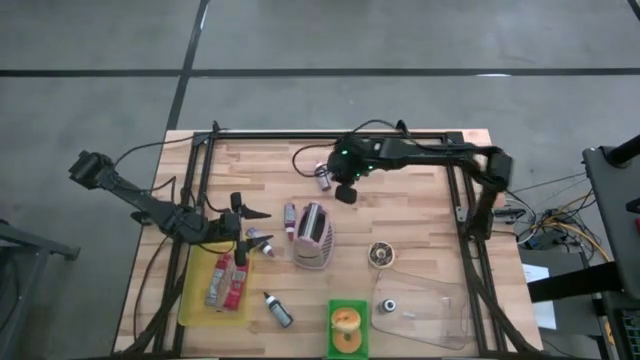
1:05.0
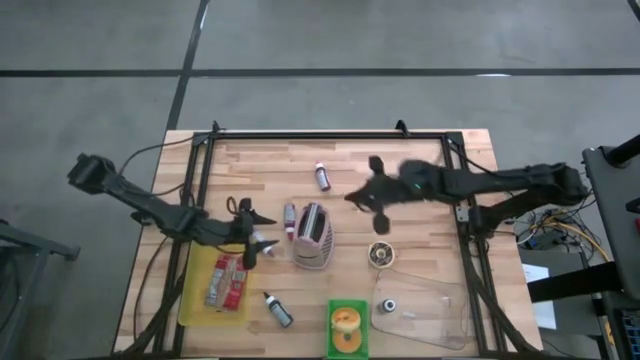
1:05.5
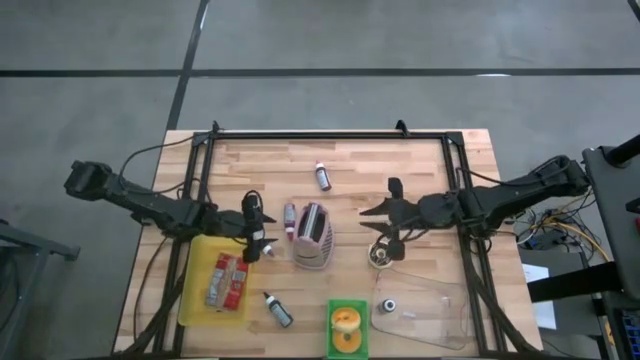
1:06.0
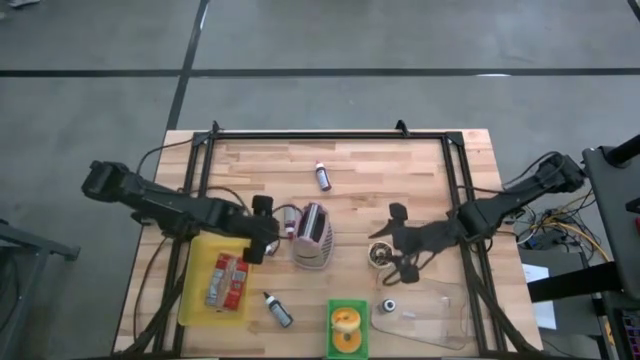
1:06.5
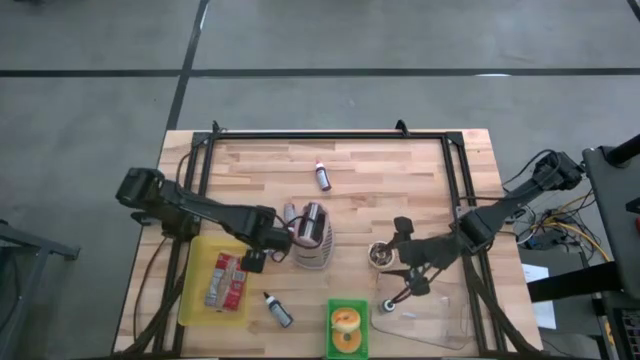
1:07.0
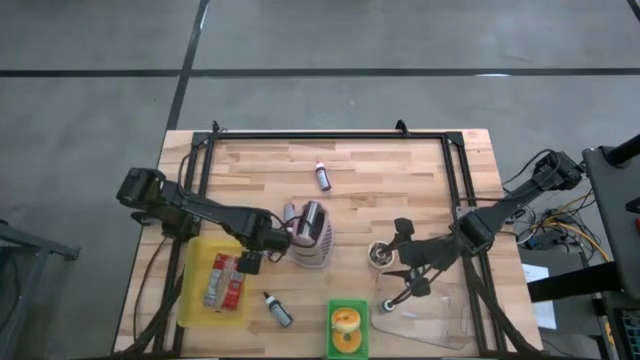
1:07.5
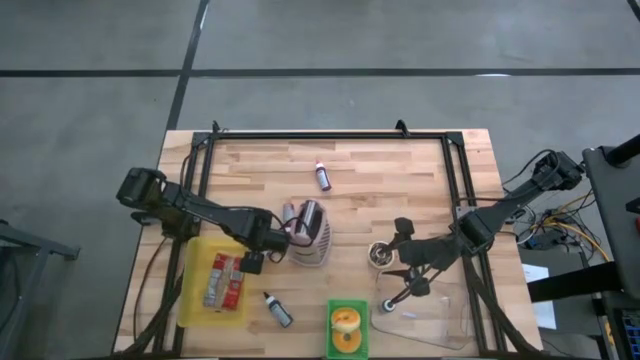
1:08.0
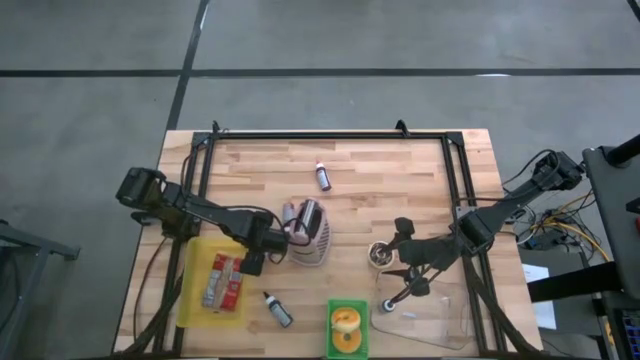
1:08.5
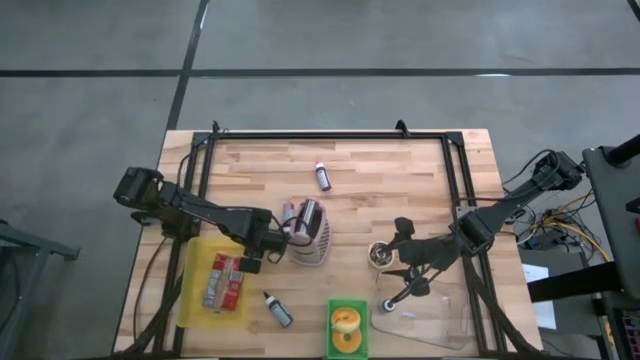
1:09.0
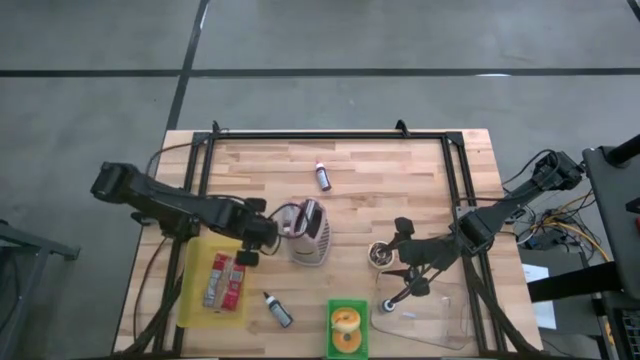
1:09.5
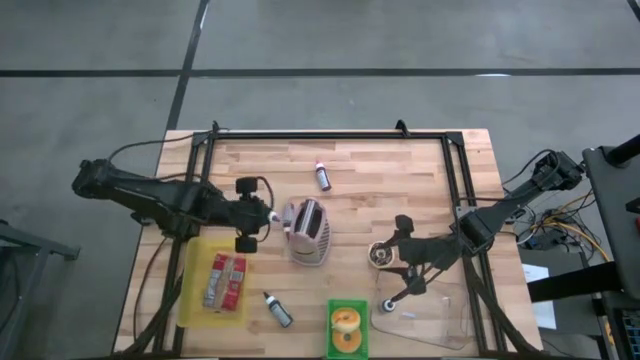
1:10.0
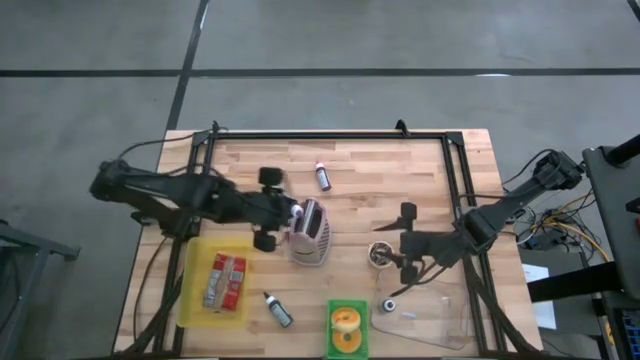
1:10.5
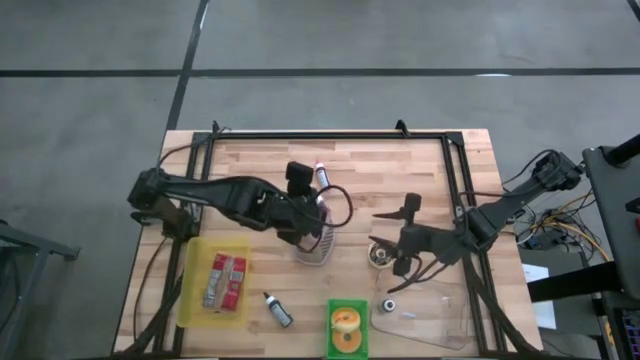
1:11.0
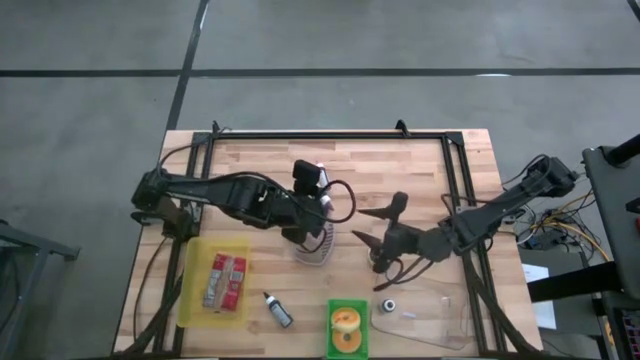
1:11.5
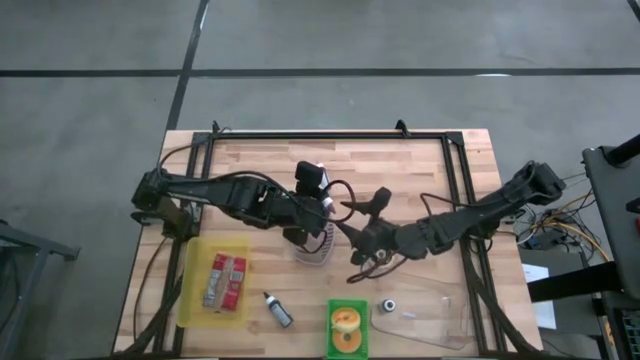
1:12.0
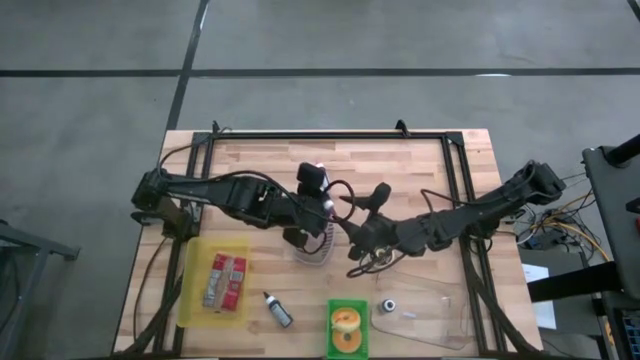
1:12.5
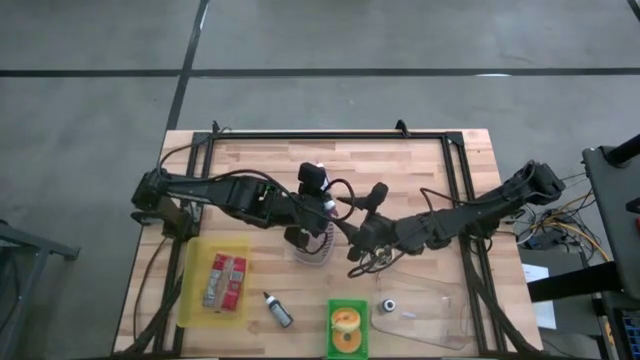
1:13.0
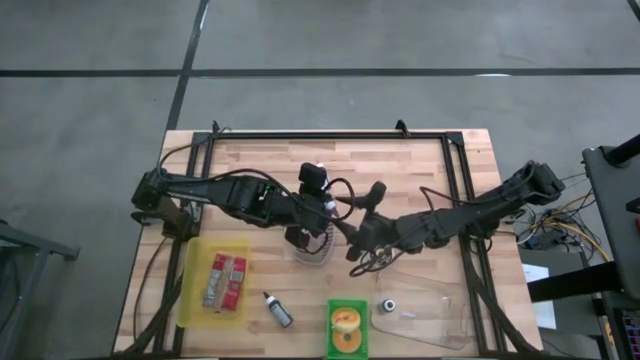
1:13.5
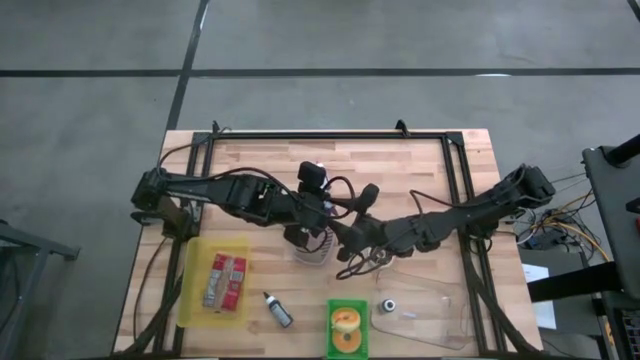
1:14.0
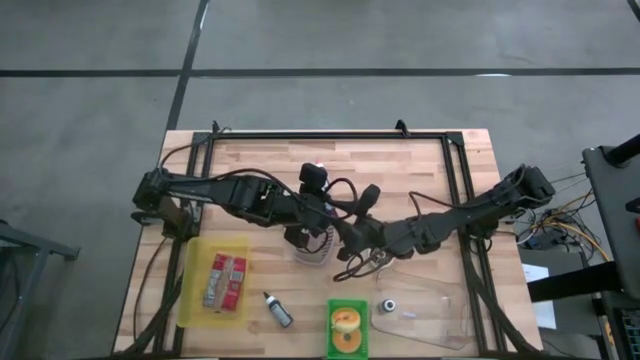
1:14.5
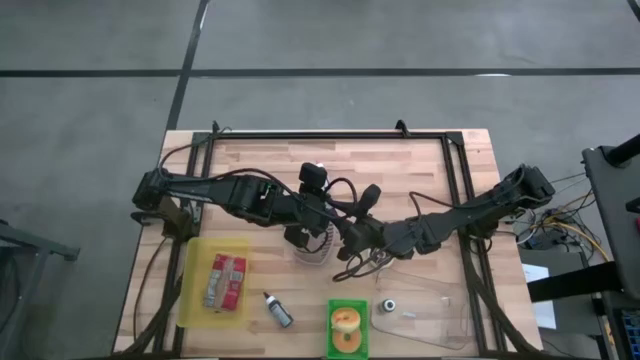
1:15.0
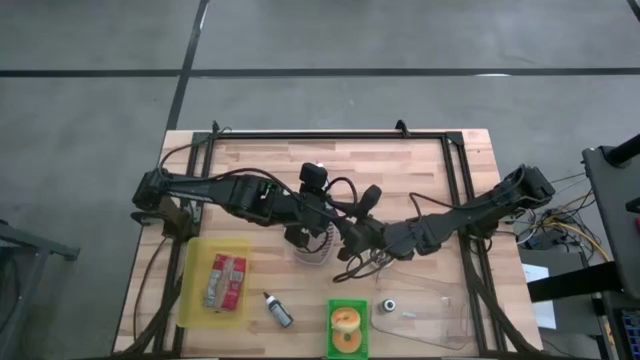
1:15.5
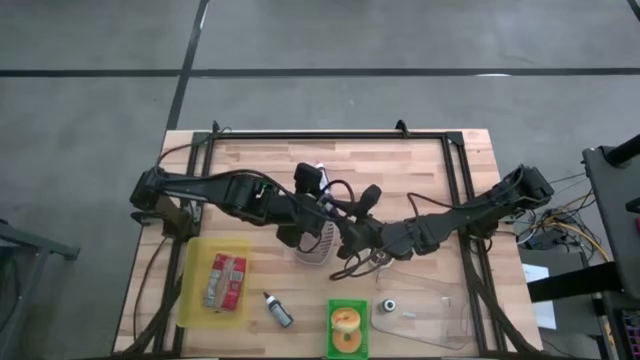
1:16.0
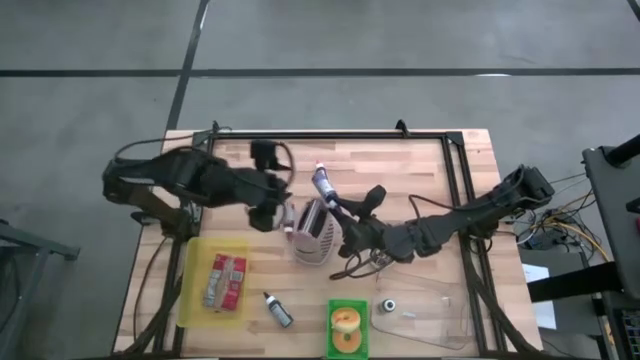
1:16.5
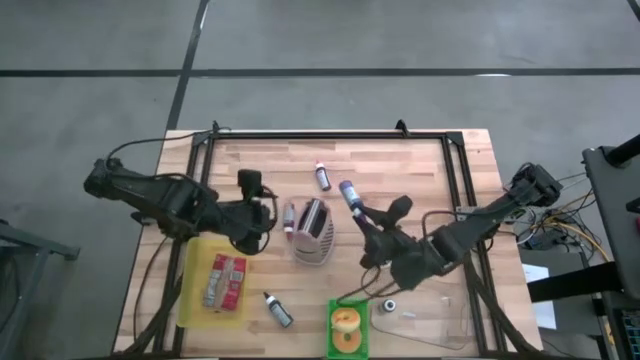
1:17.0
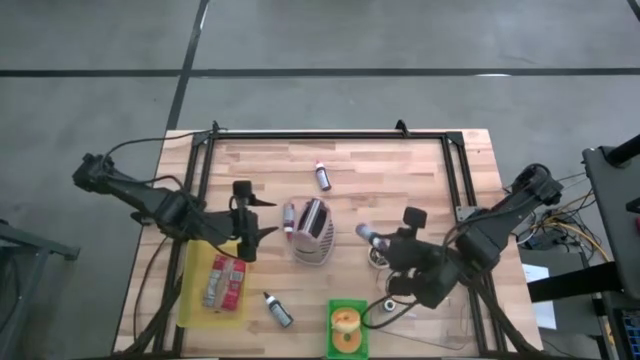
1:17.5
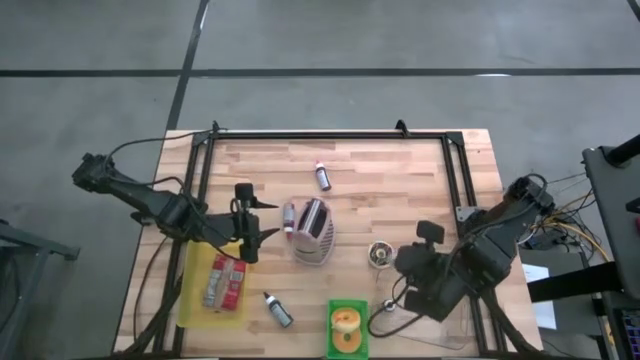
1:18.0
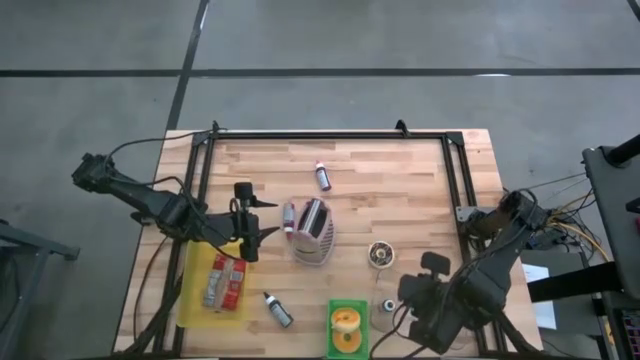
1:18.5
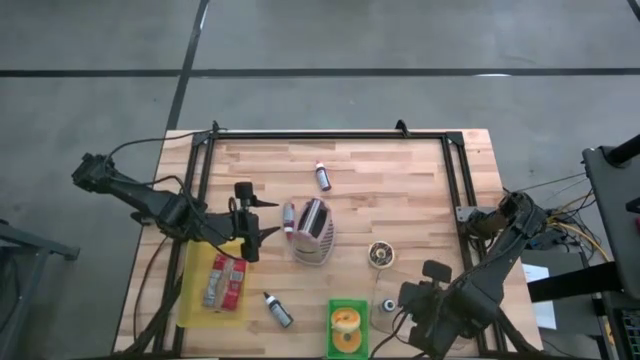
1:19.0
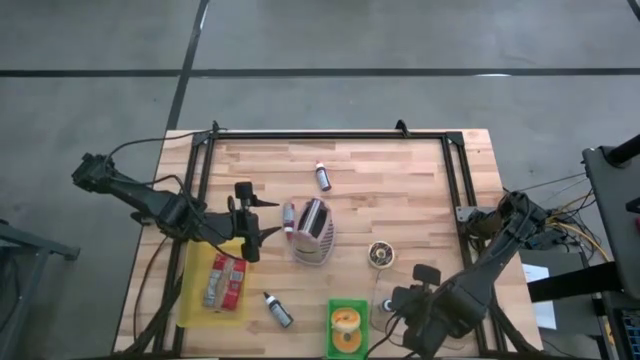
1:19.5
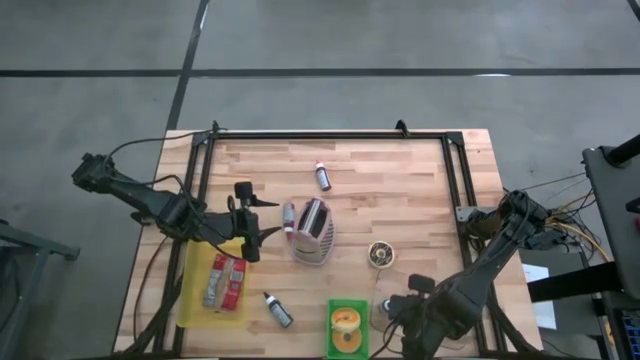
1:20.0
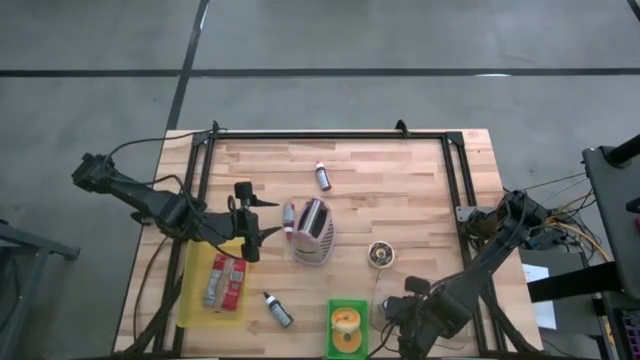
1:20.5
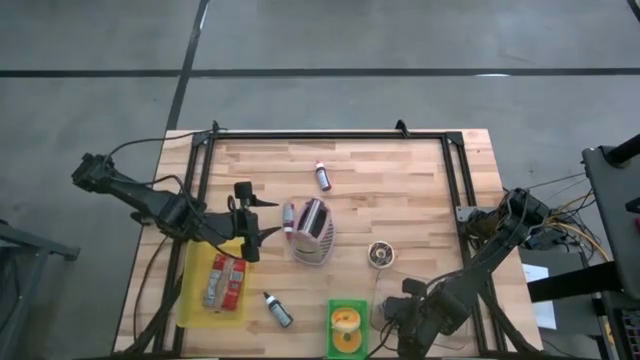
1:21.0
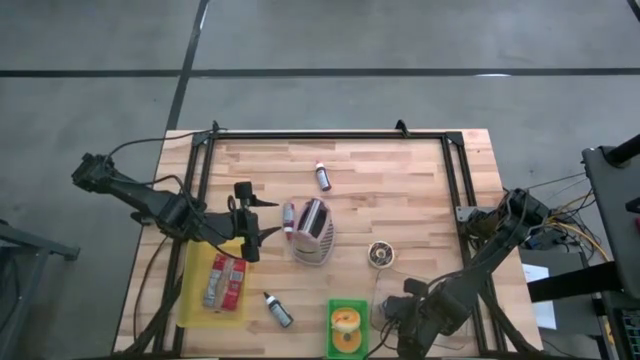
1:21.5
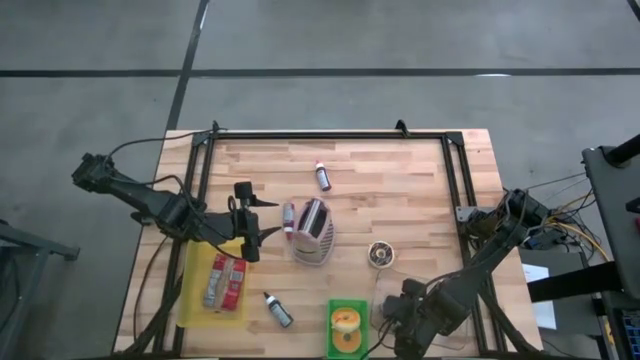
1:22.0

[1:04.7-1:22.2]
Task: Pick & Place Food Item
Put the violet food coloring bottle into the transparent bin

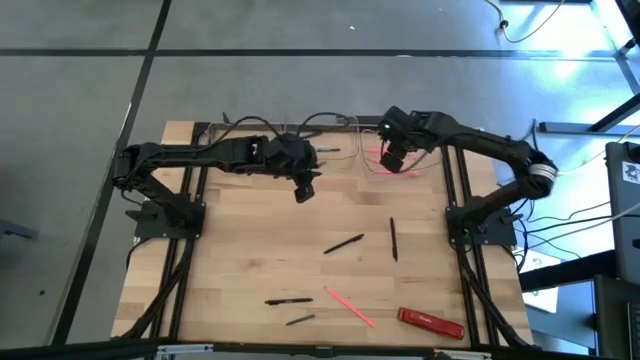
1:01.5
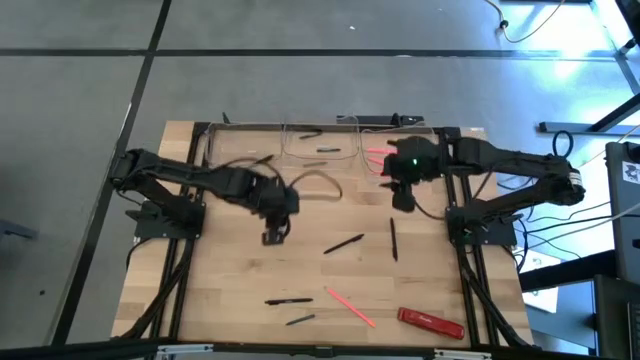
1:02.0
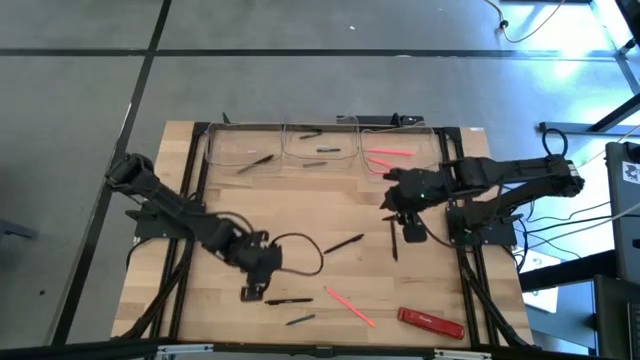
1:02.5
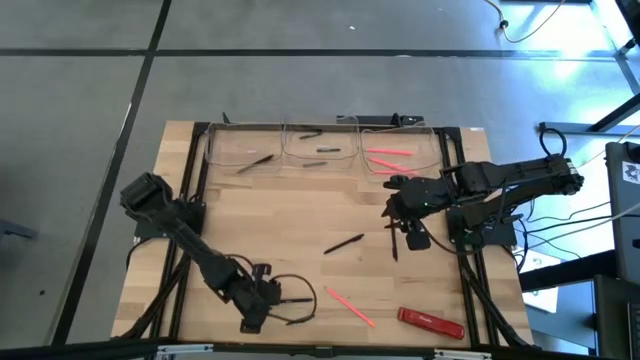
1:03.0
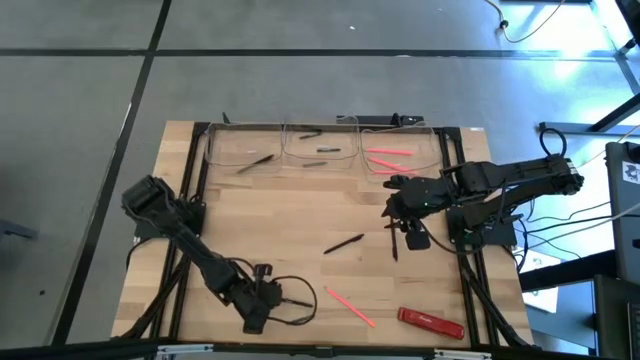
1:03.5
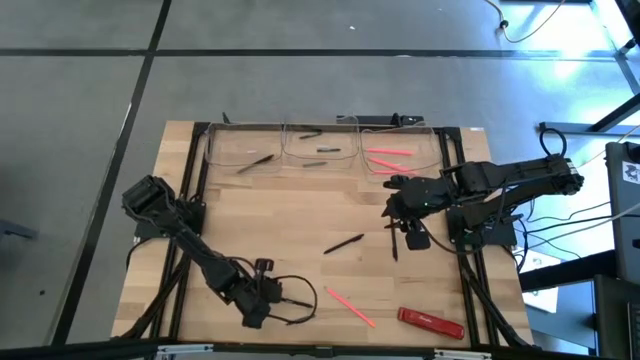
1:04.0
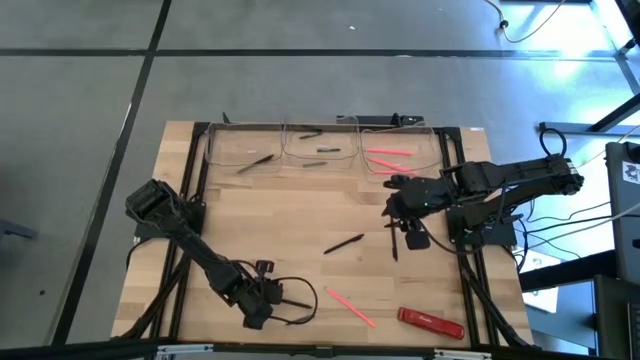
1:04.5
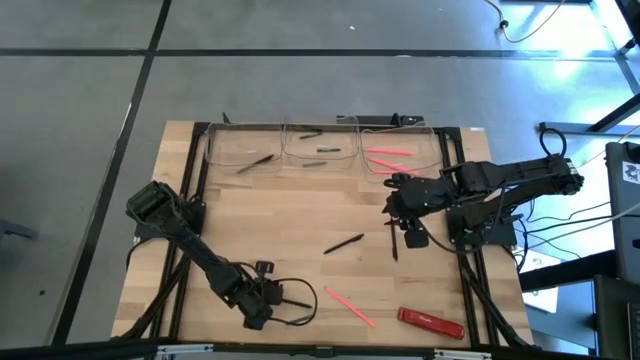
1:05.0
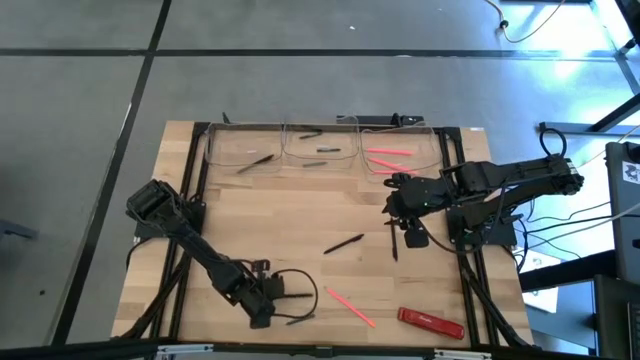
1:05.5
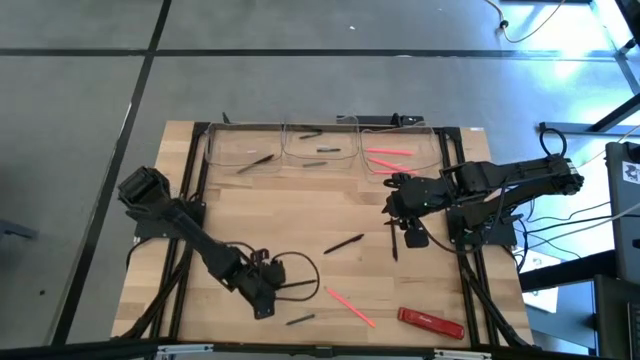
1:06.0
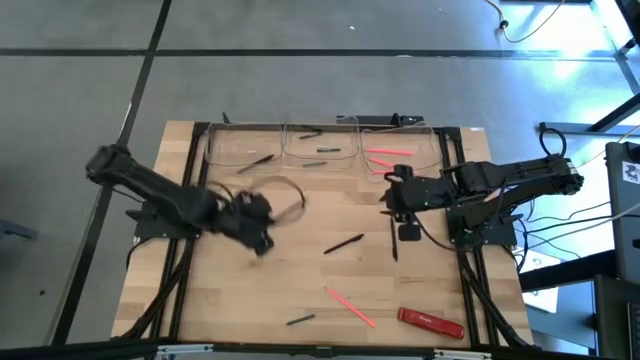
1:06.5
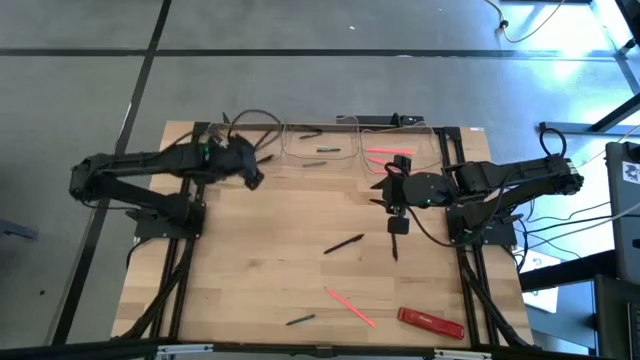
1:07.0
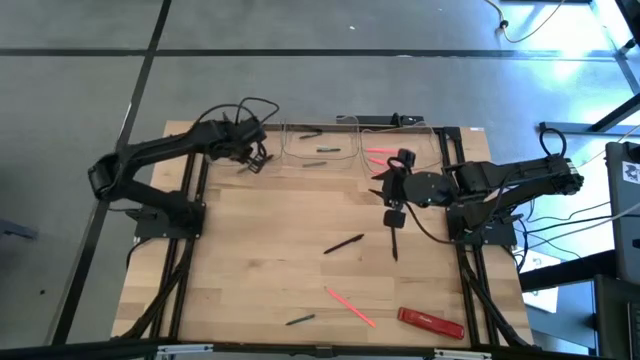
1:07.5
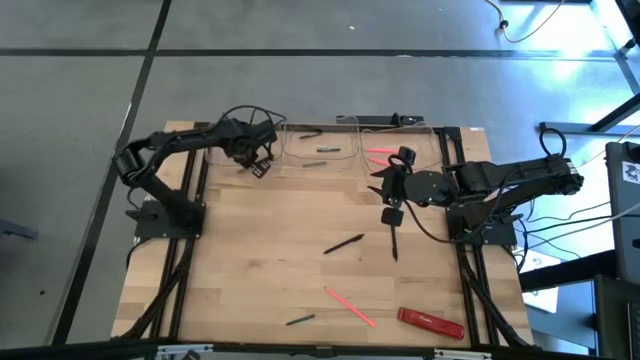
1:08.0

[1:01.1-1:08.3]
Task: Sort crayons/erasers/pens/pencils in bins
Put the black pen into the left transparent bin
